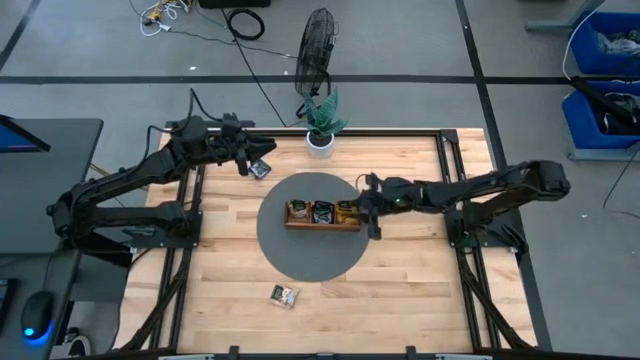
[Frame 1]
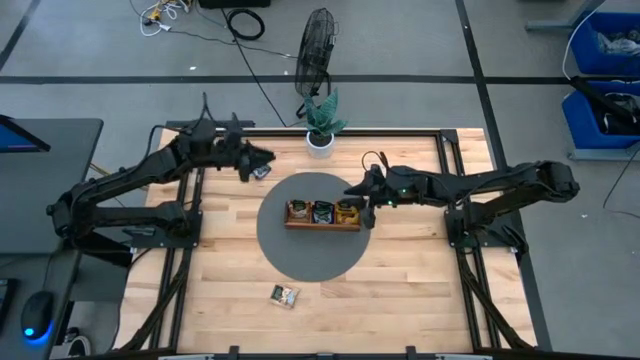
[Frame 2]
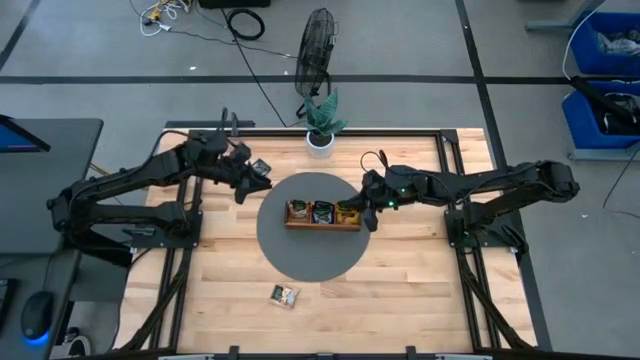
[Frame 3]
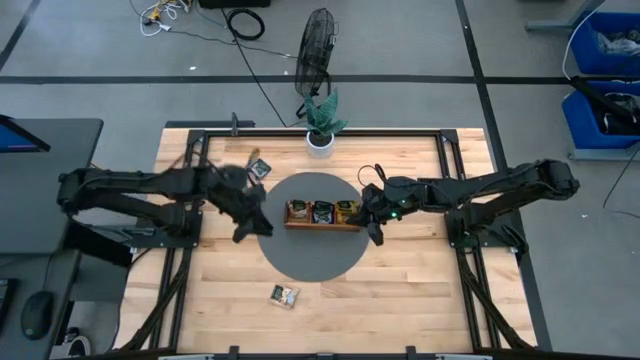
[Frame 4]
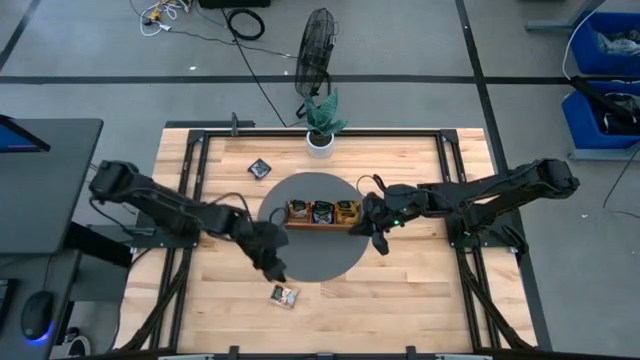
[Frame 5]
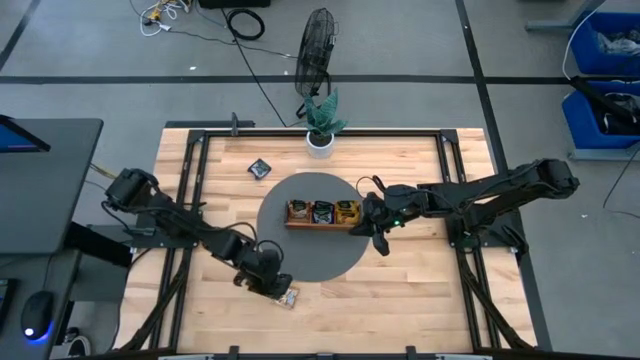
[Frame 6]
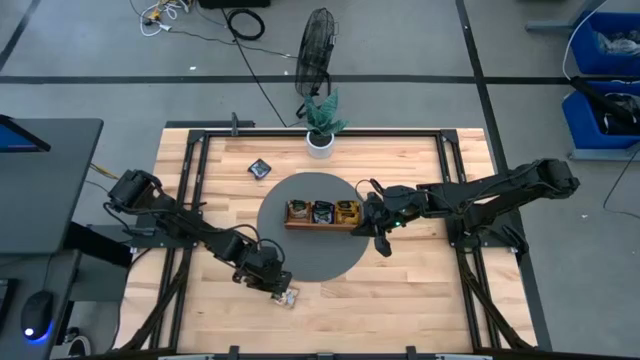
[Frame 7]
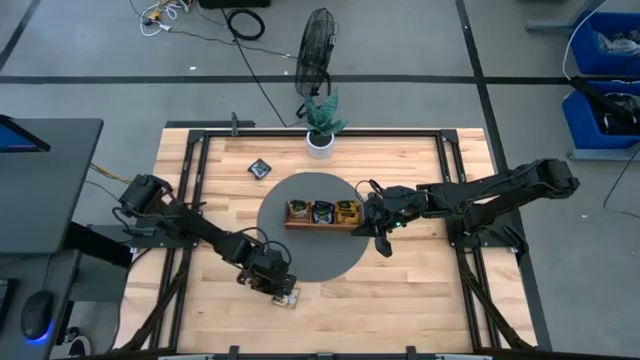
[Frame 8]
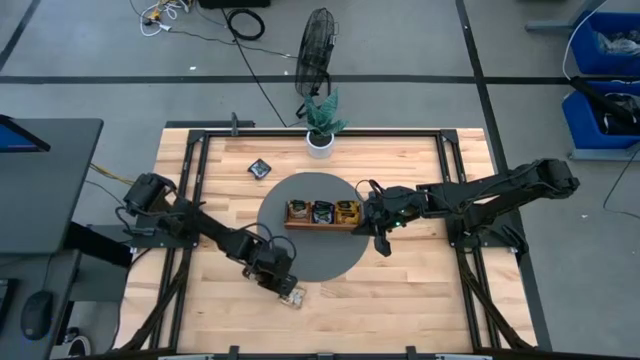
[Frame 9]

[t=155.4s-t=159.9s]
Task: Pick & Place Tea
Put the brown tea bag into the left section of the wooden organizer

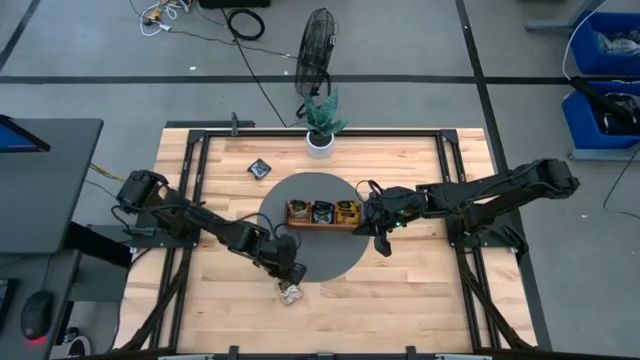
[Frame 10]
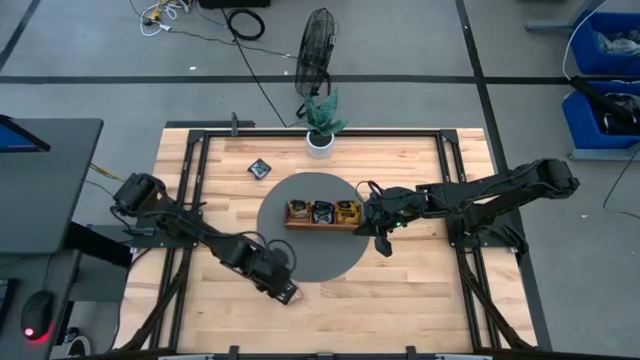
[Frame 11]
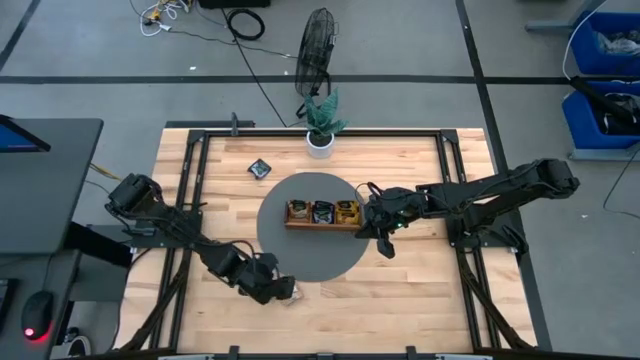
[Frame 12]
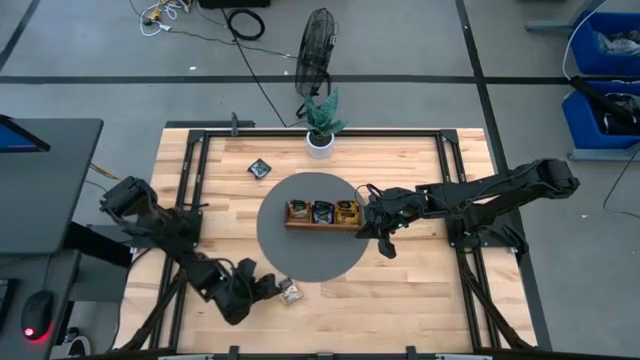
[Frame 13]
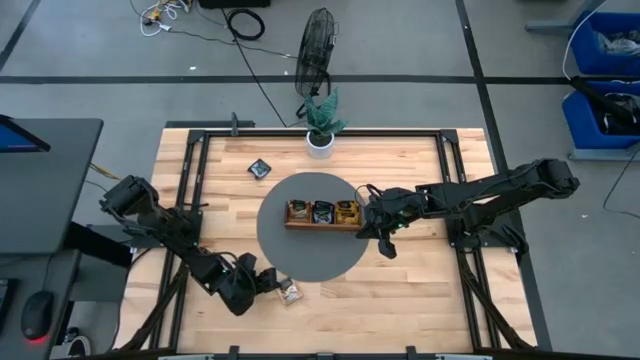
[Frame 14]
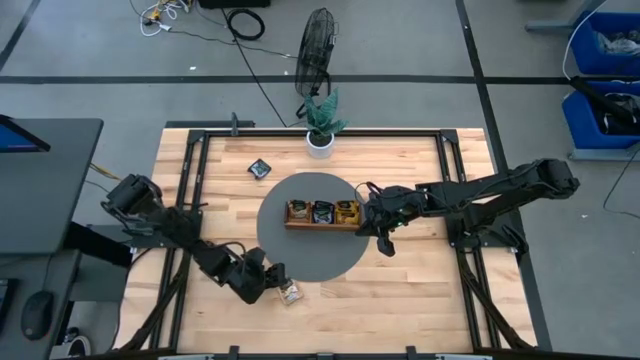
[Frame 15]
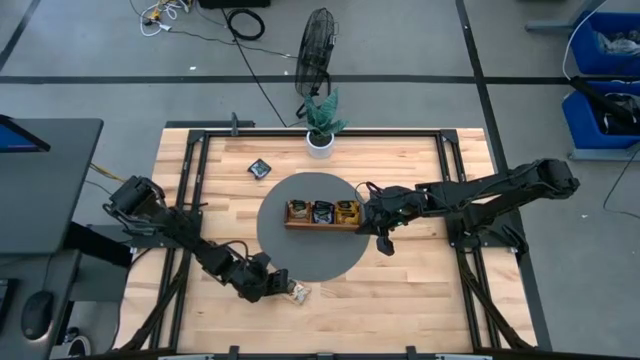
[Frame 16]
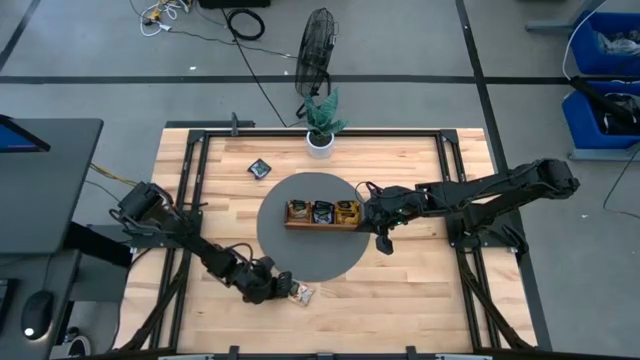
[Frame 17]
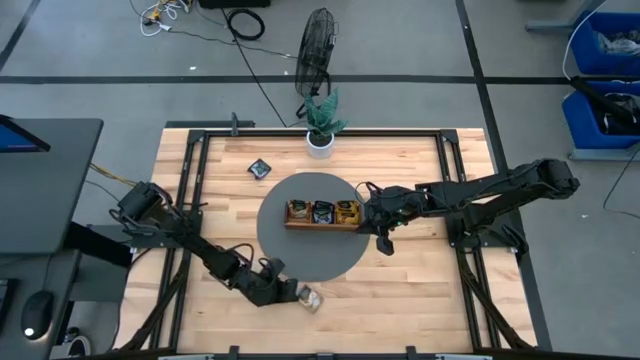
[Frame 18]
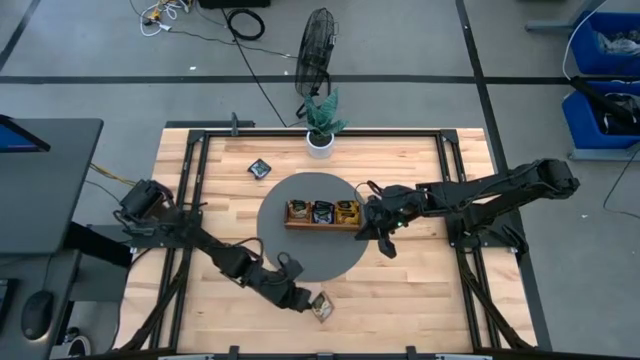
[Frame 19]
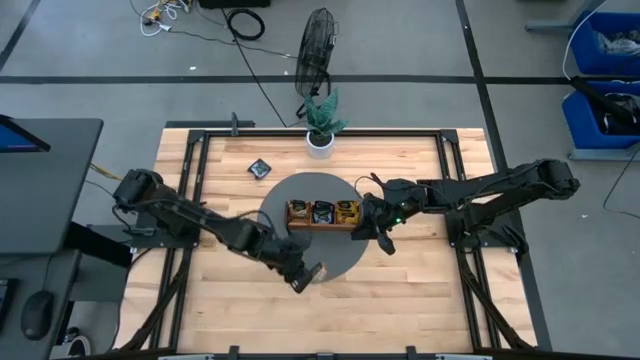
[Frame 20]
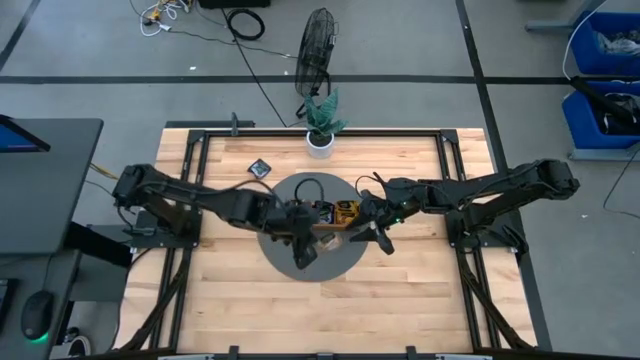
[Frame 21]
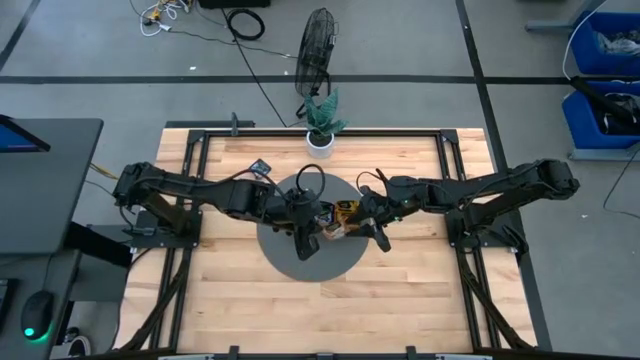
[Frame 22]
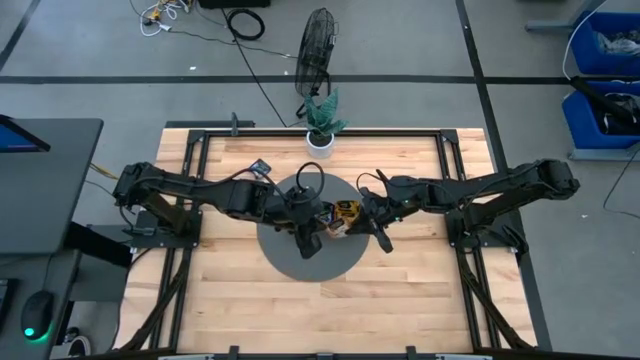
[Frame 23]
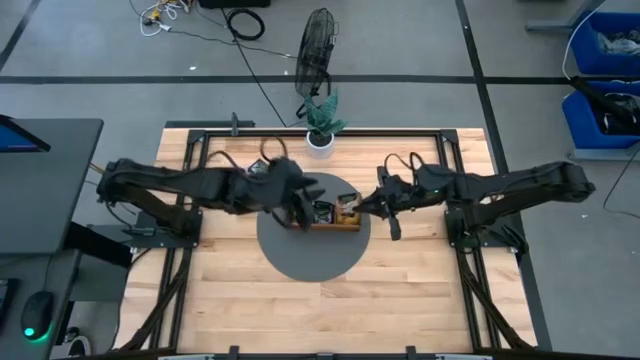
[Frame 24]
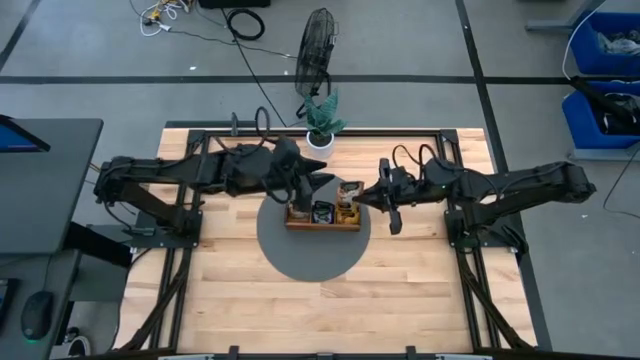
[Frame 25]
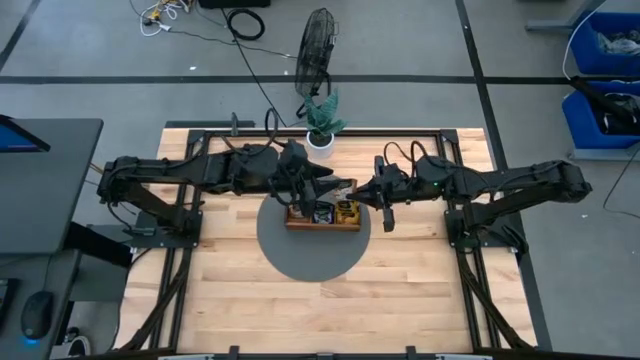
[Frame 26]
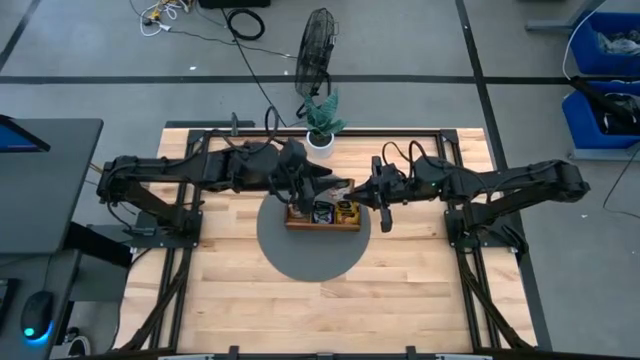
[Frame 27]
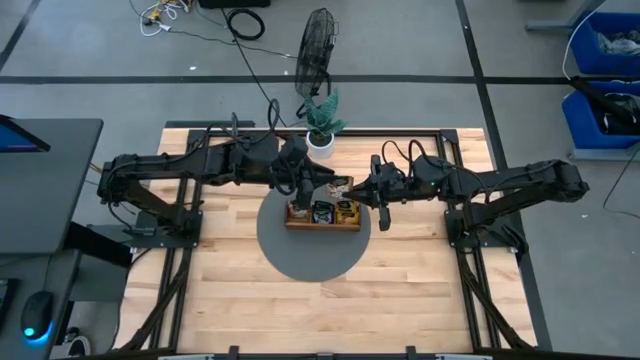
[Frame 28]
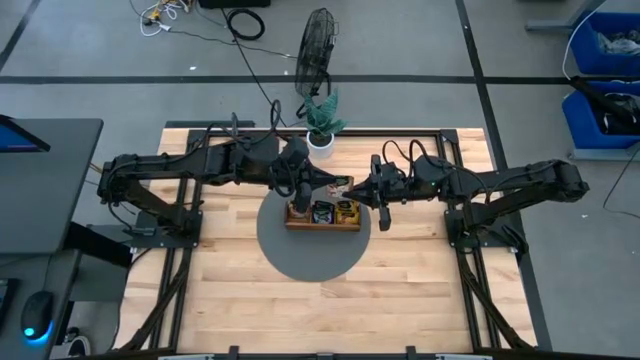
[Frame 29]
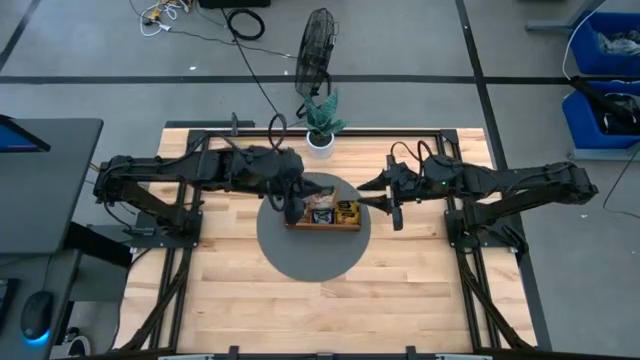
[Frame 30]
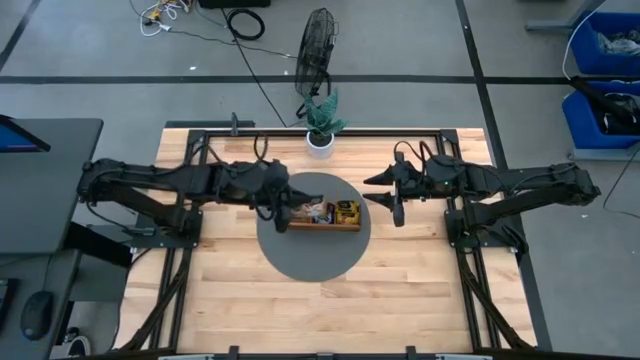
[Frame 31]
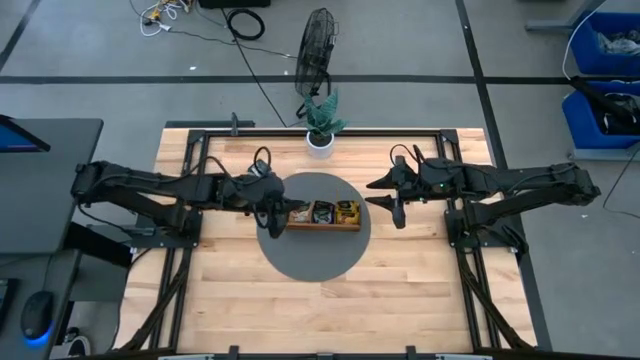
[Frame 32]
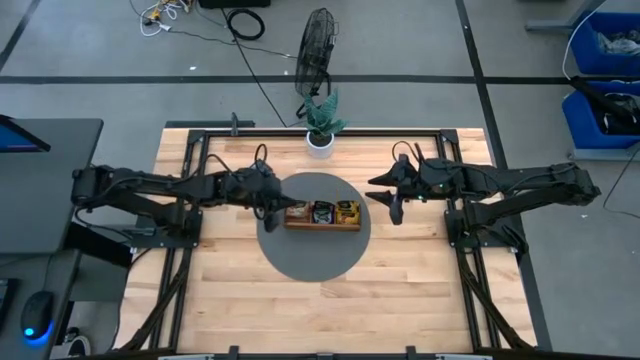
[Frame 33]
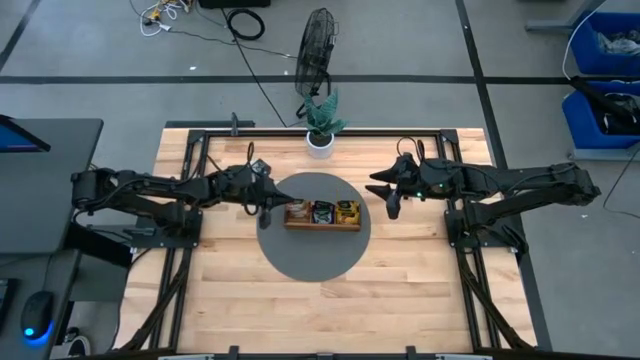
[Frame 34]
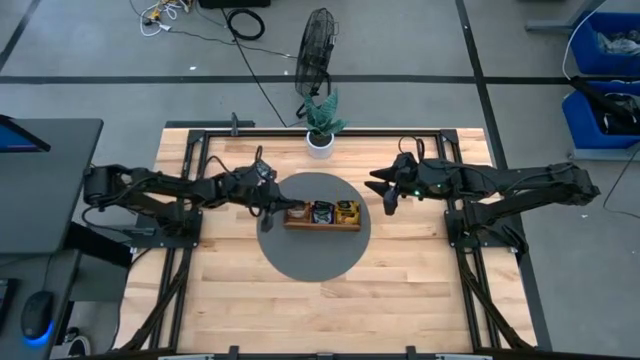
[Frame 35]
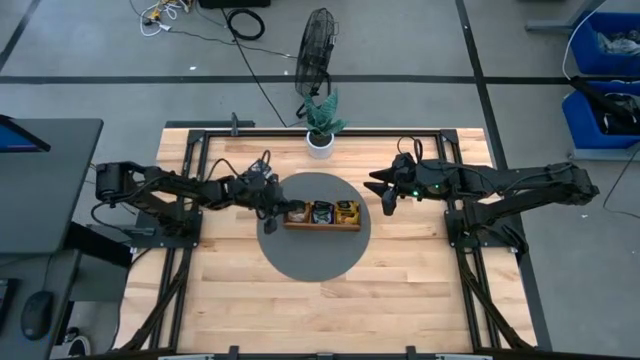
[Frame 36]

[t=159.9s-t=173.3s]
Put the brown tea bag into the left section of the wooden organizer

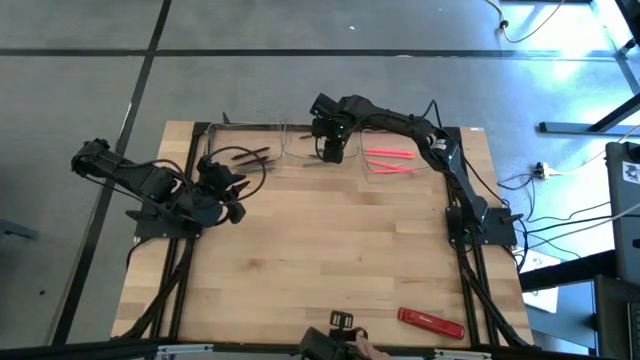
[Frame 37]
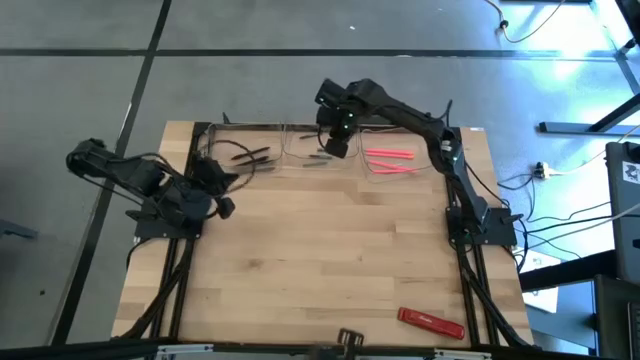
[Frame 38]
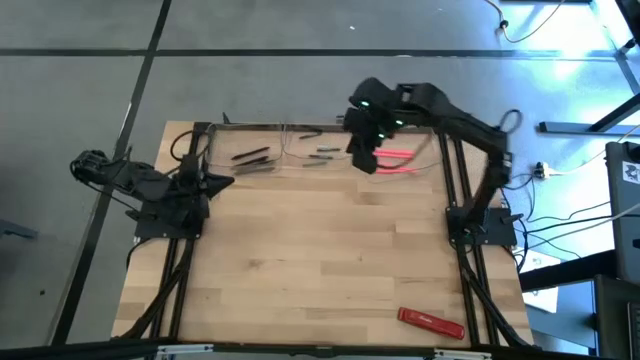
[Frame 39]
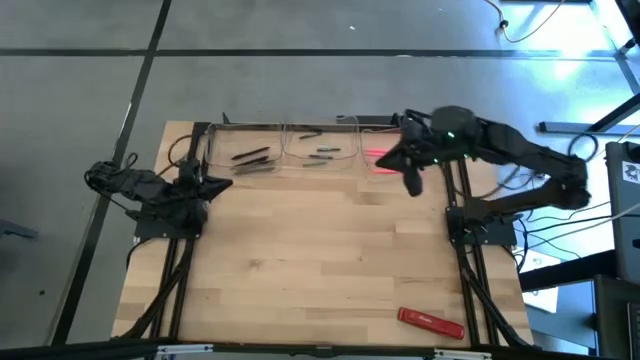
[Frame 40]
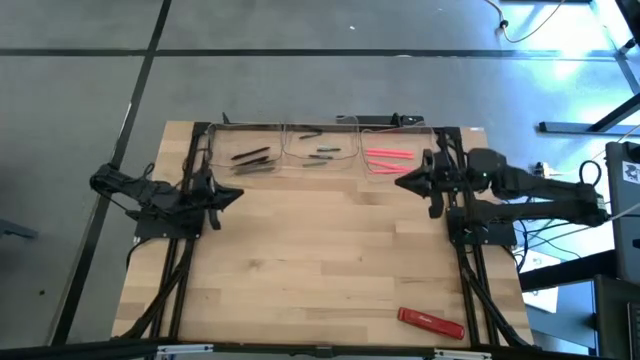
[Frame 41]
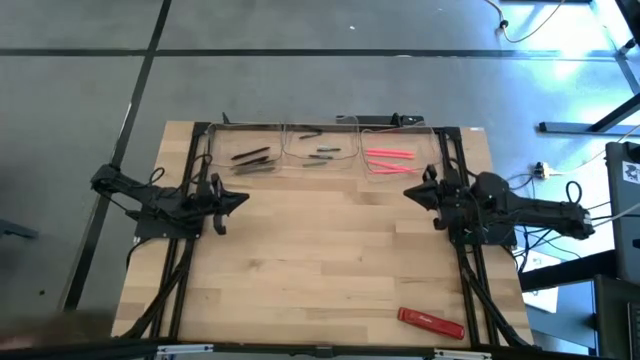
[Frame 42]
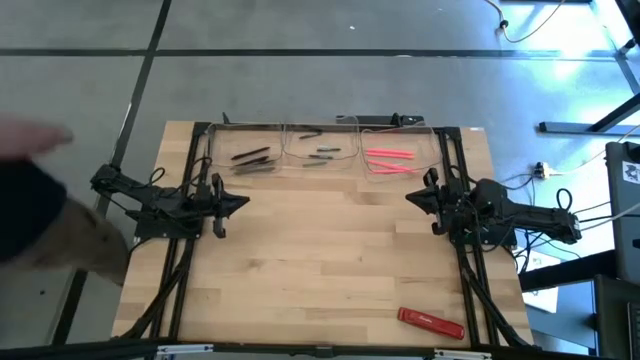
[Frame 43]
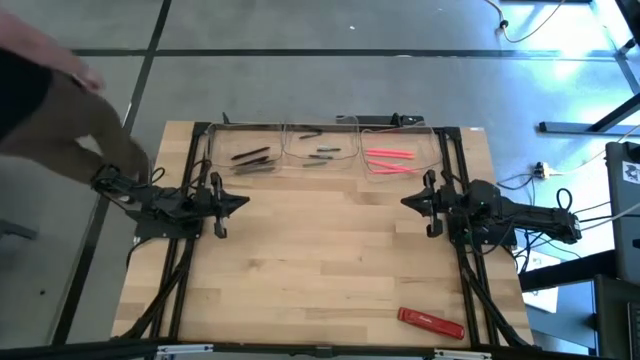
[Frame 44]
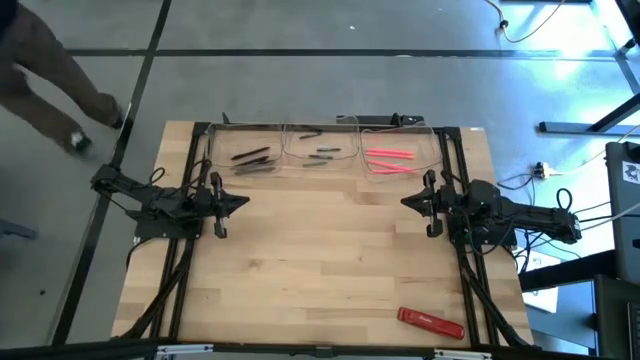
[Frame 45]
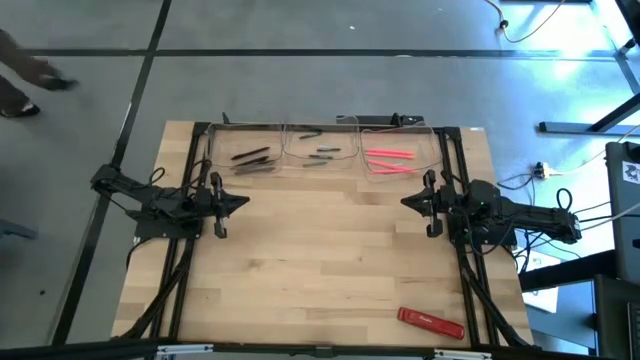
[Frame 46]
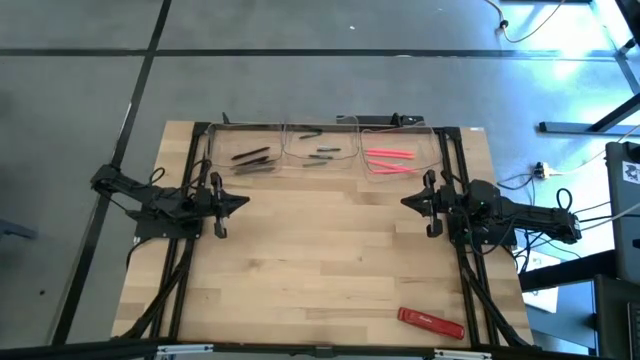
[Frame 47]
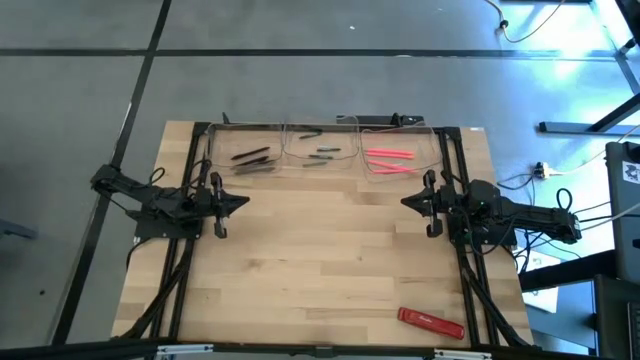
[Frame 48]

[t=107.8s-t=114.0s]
Task: Sort crayons/erasers/pens/pencils in bins
Return to Home Position
